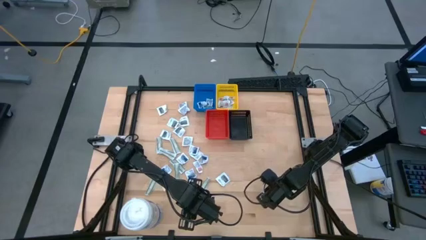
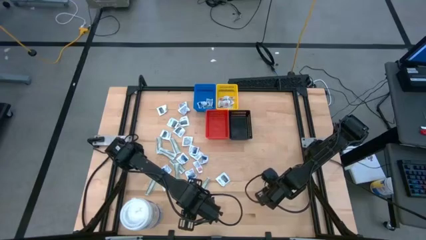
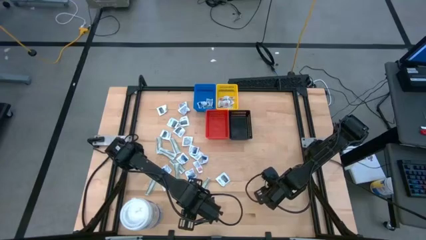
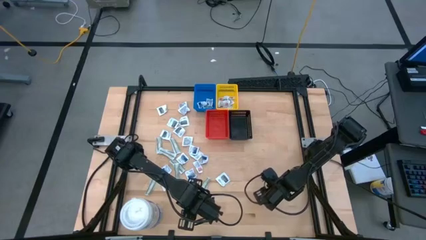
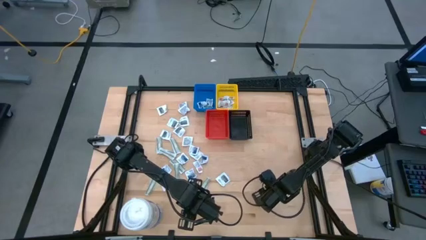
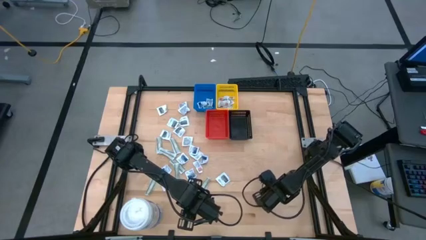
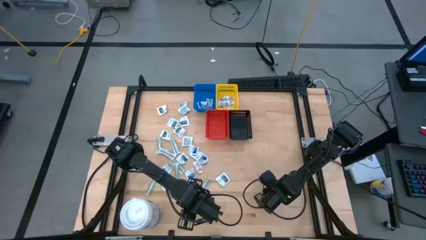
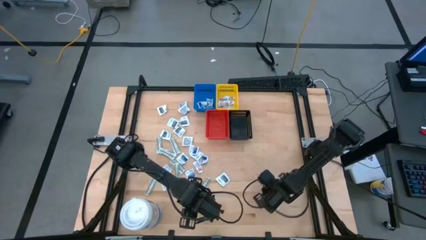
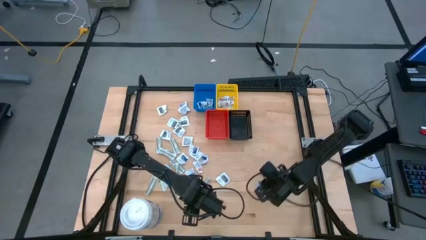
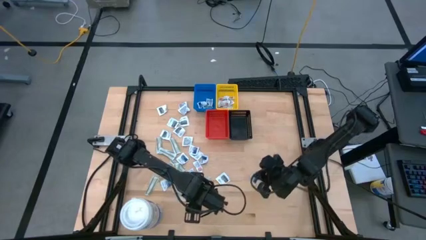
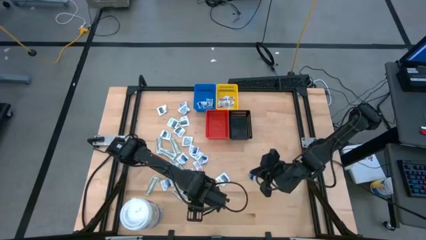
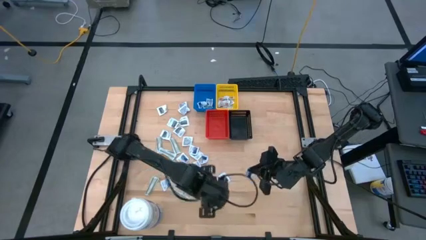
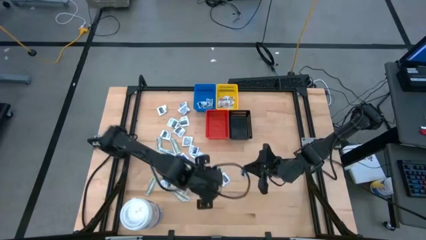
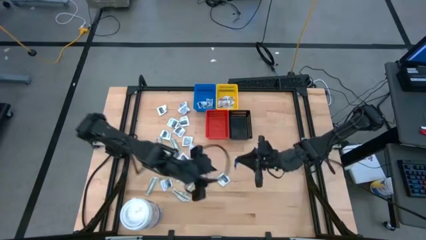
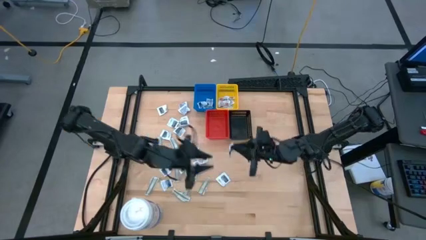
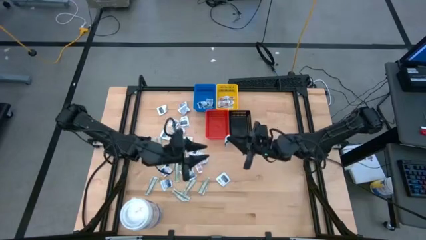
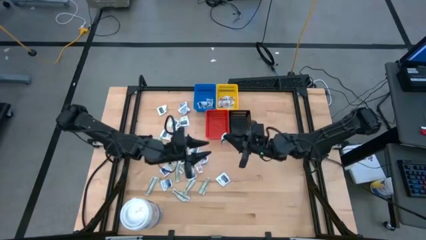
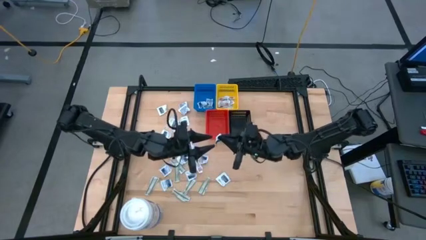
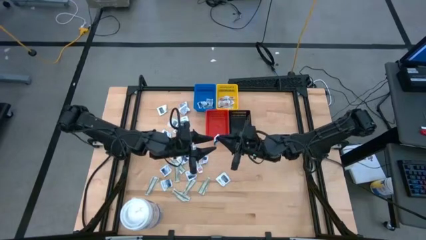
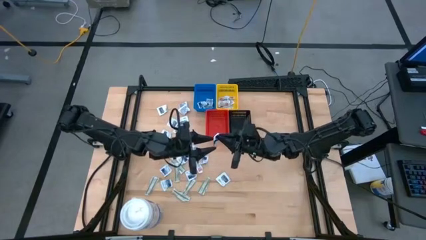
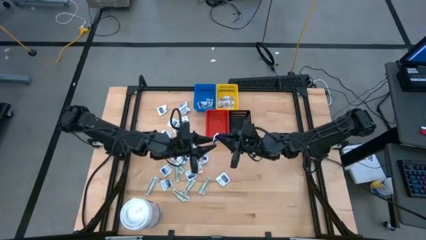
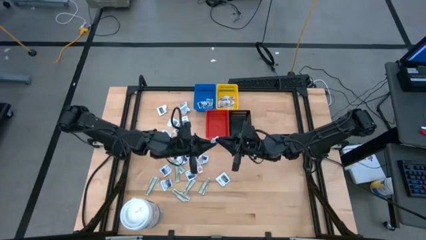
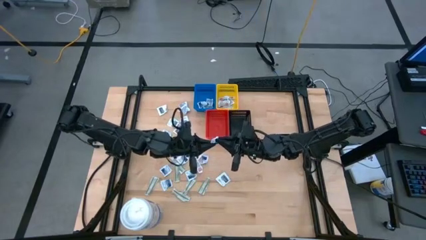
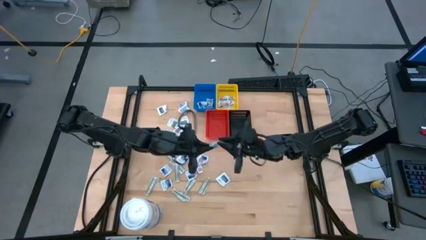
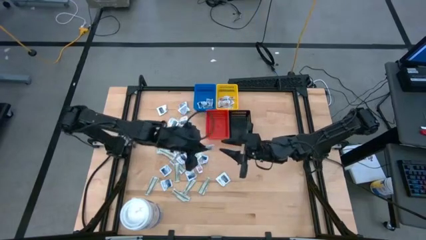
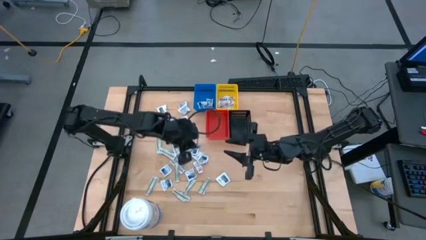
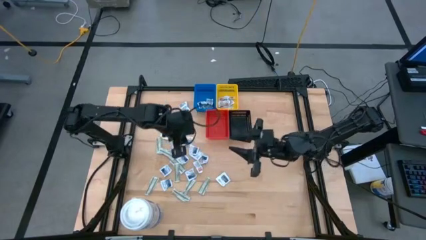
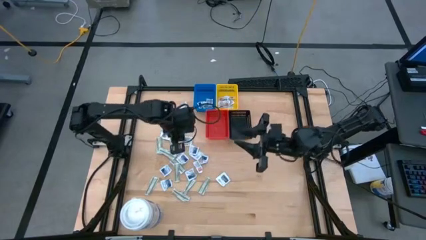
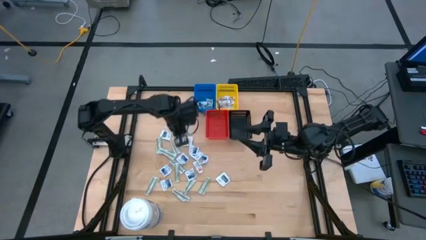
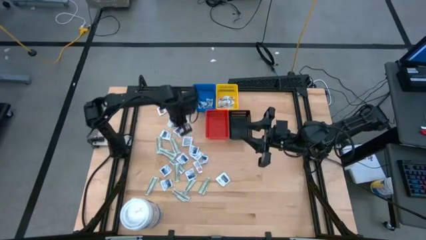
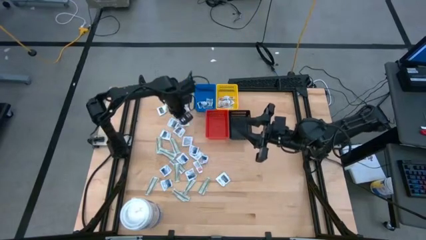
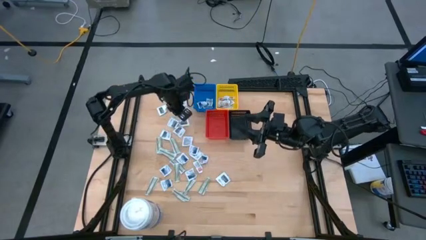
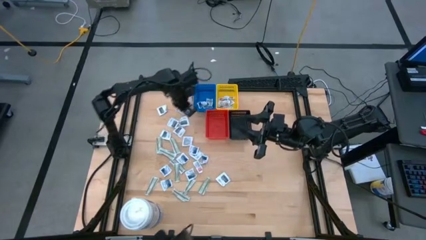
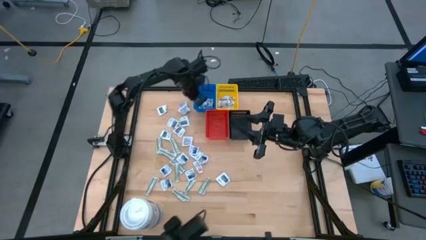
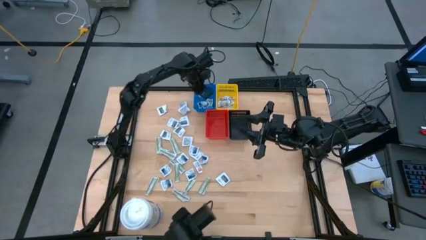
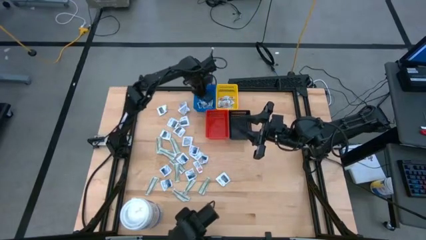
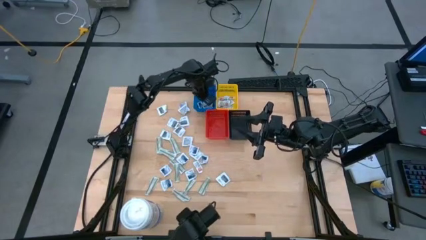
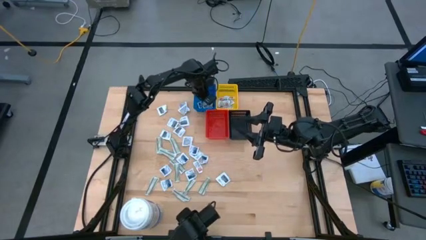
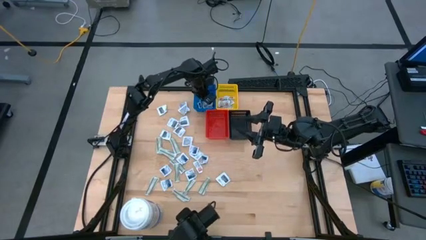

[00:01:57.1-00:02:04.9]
Task: Pick & Place First Aid Supplies
Put the alcohol pad into the blue bin

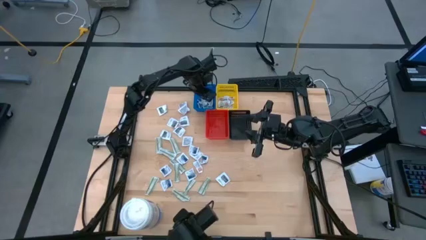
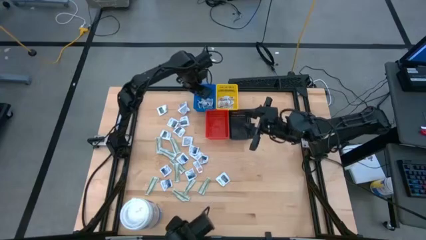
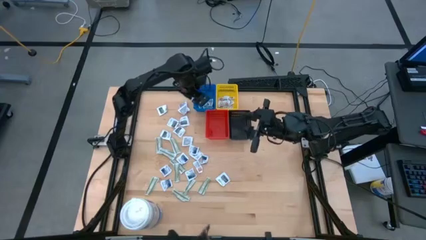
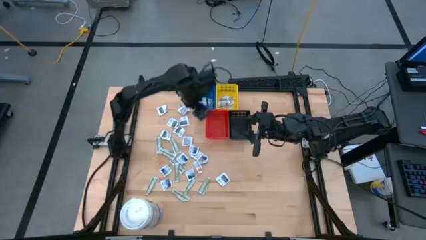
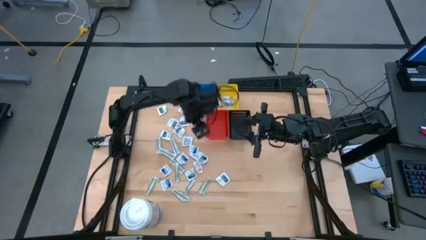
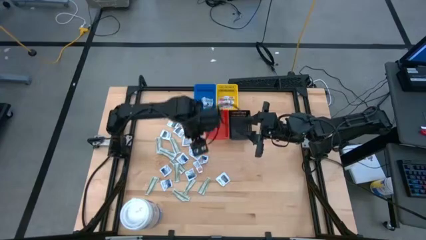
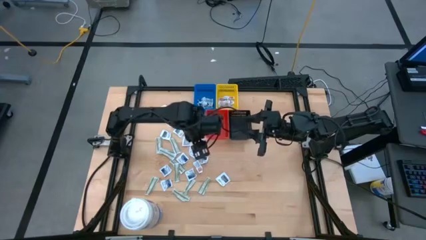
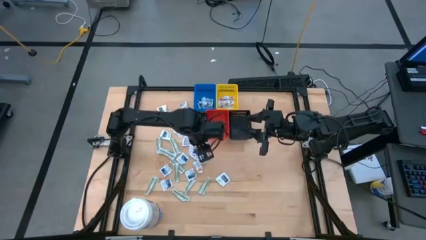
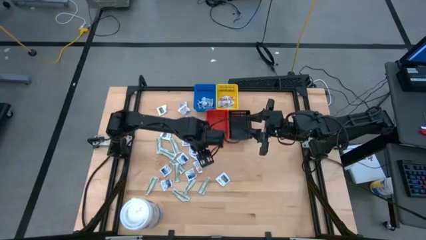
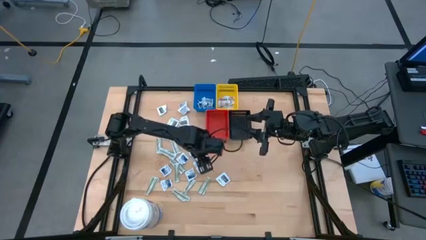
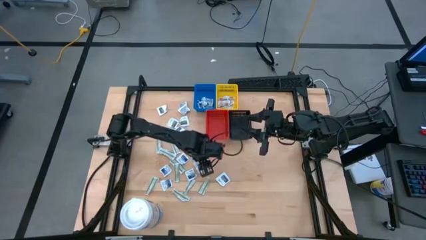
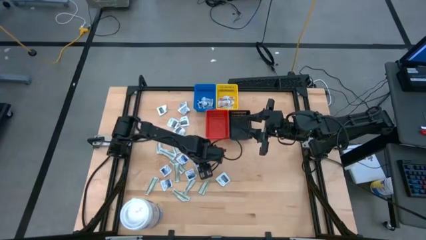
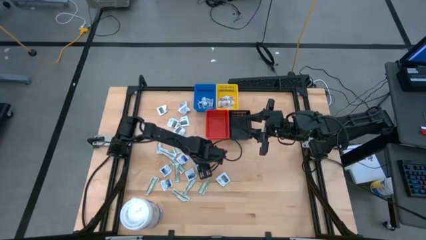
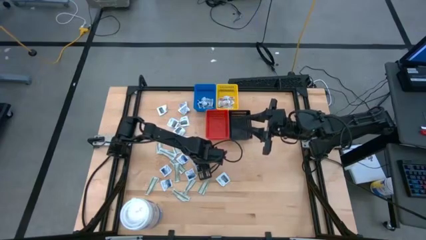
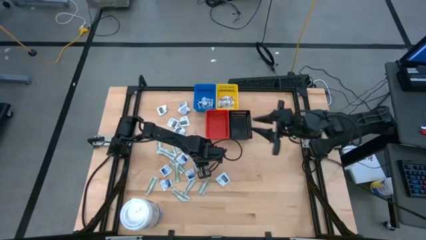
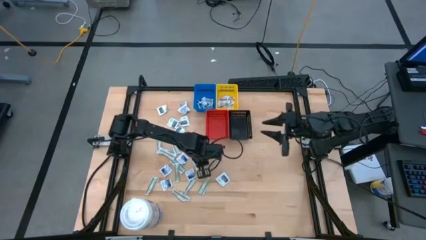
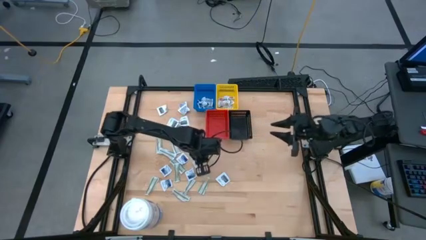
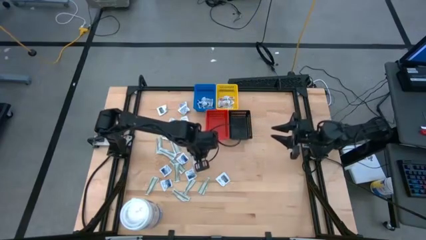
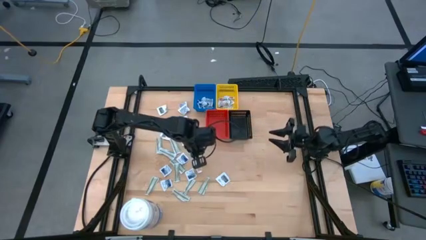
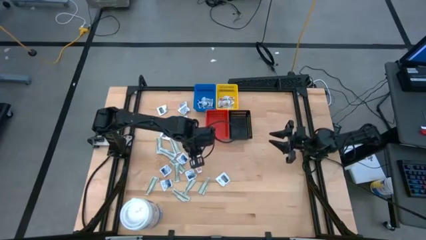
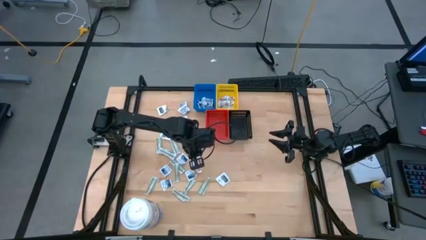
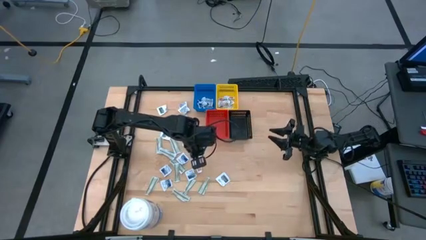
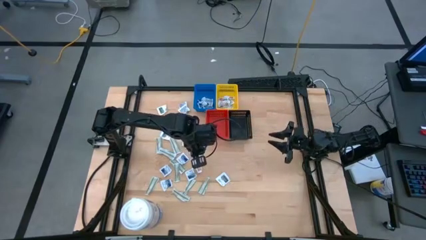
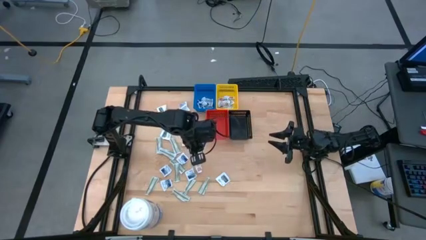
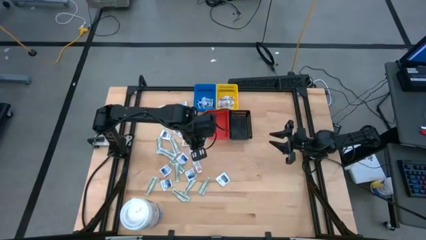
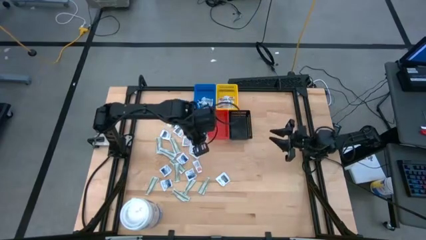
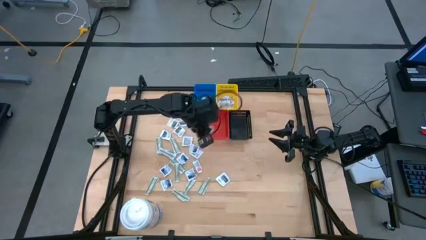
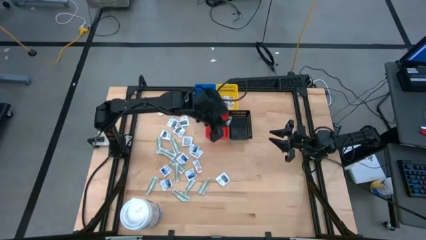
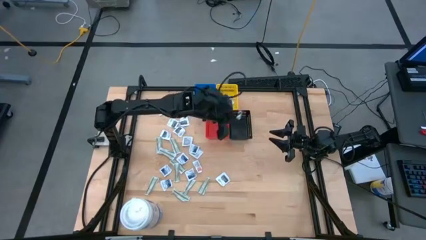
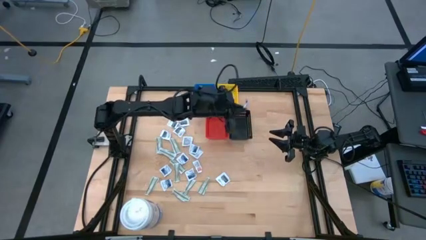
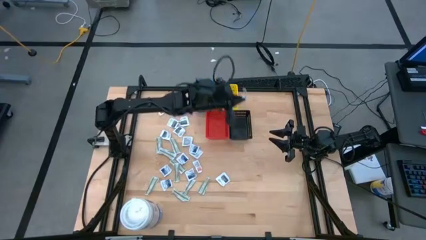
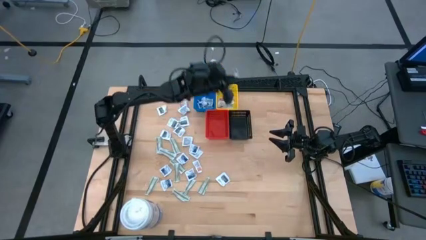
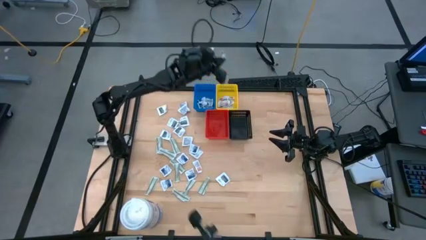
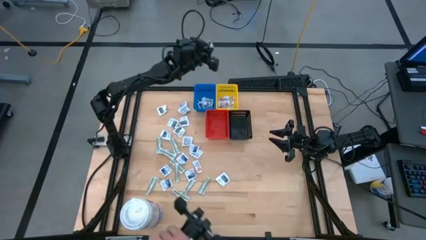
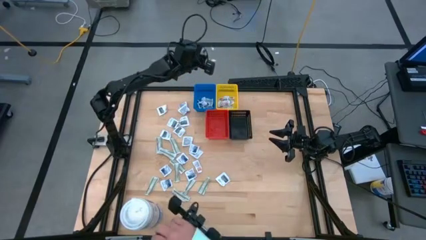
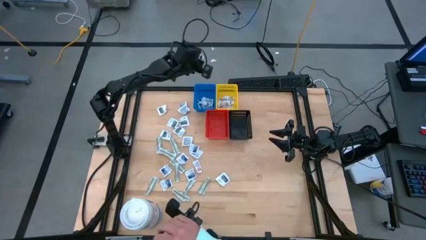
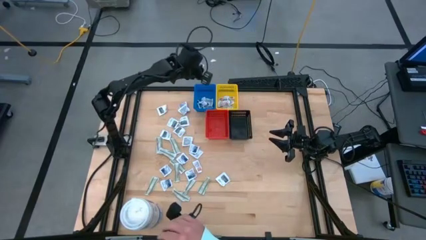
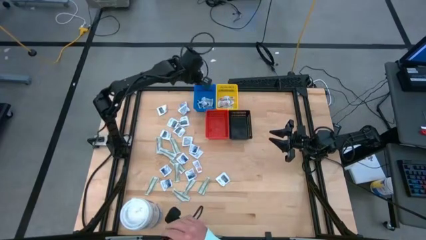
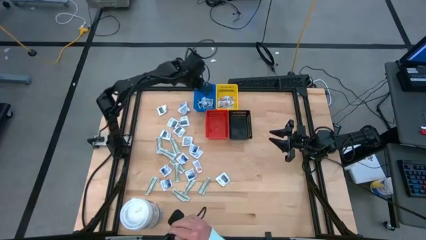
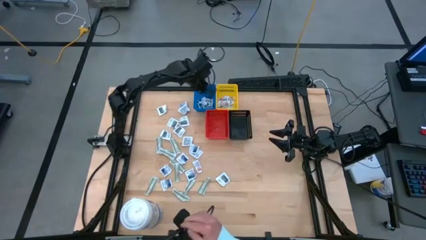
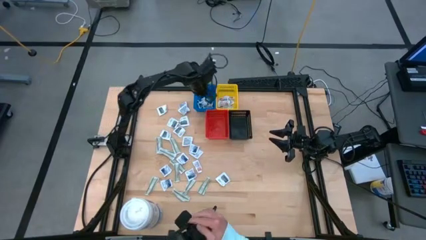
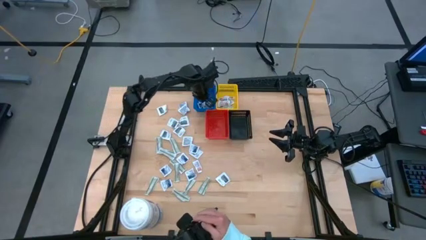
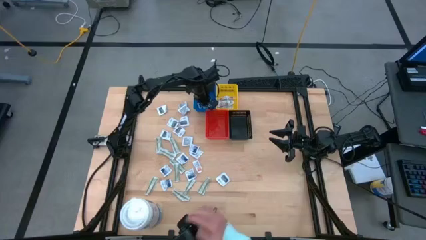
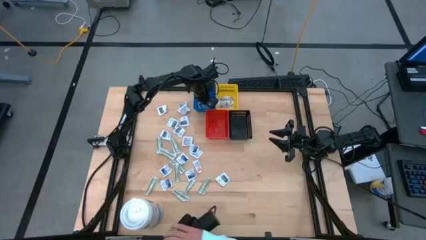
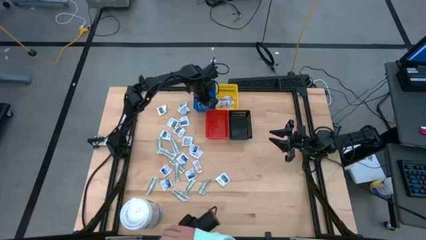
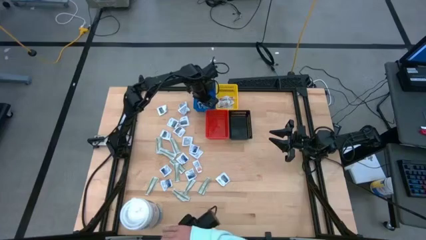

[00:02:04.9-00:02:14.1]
Put the alcohol pad into the blue bin
